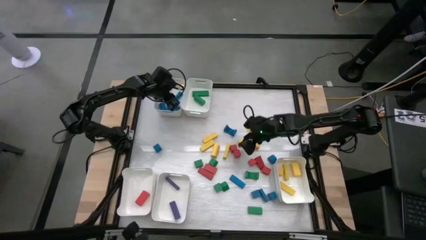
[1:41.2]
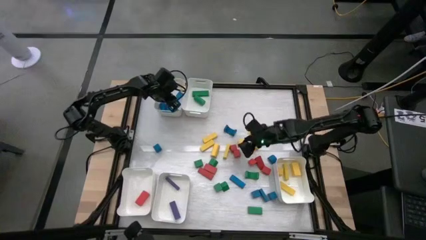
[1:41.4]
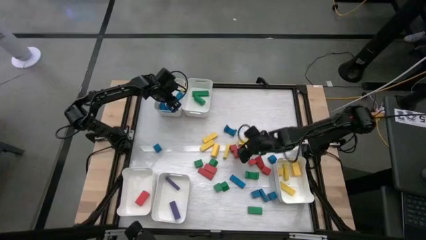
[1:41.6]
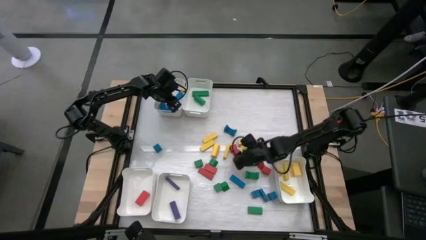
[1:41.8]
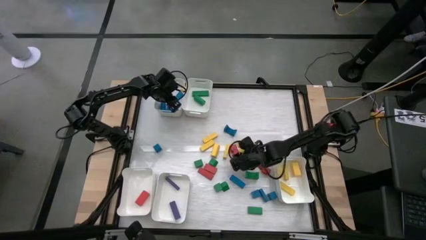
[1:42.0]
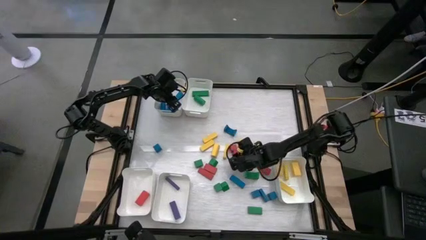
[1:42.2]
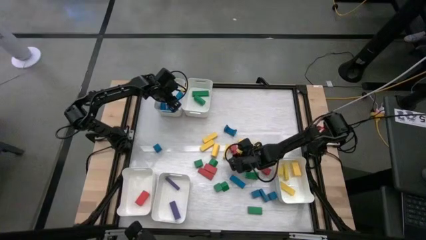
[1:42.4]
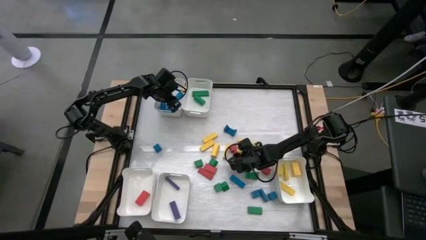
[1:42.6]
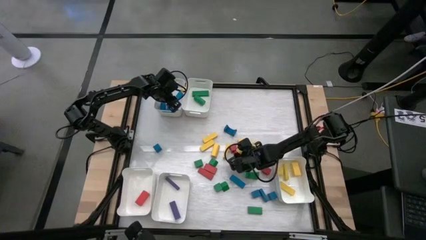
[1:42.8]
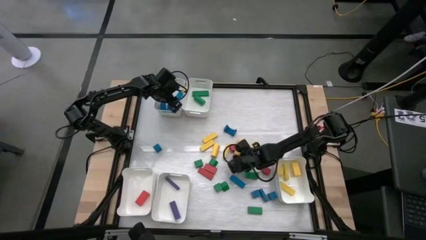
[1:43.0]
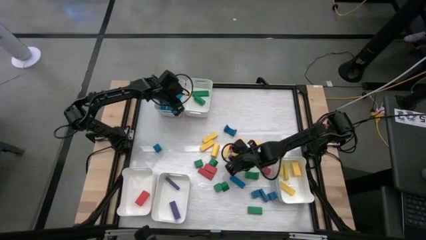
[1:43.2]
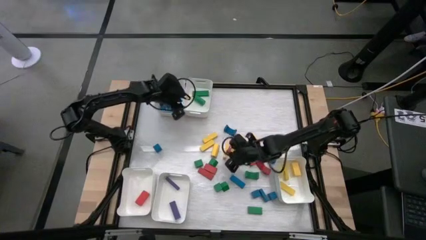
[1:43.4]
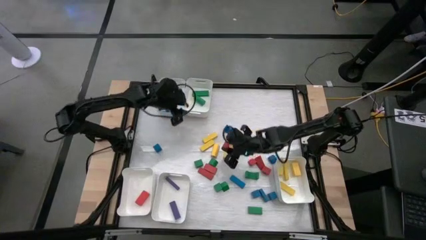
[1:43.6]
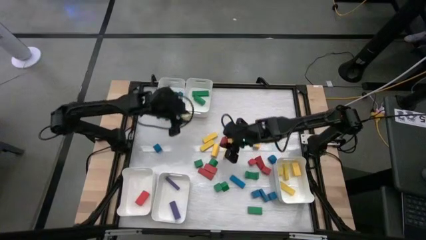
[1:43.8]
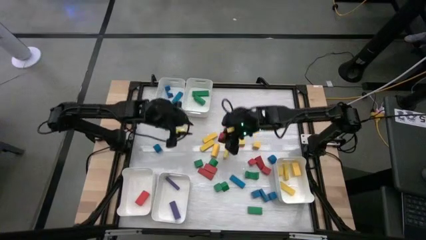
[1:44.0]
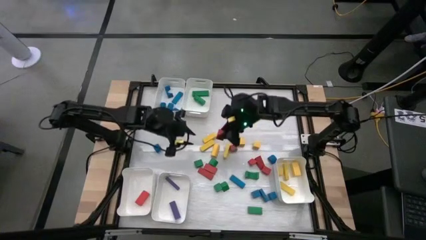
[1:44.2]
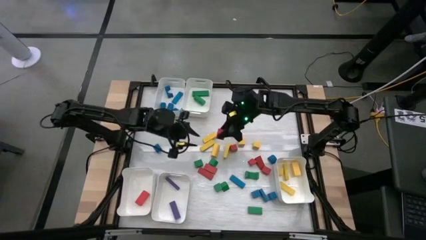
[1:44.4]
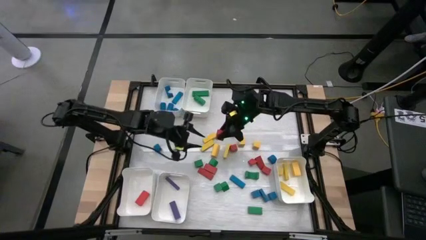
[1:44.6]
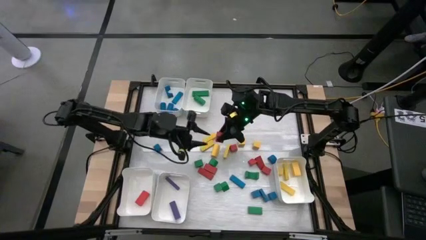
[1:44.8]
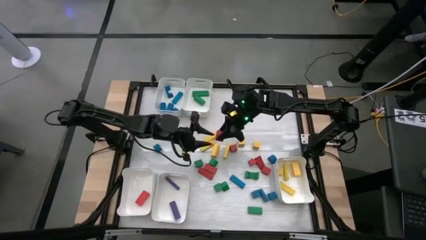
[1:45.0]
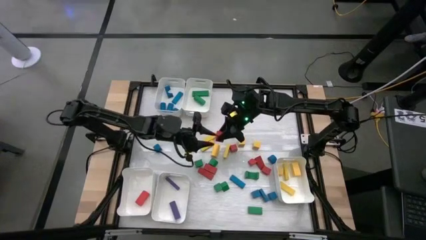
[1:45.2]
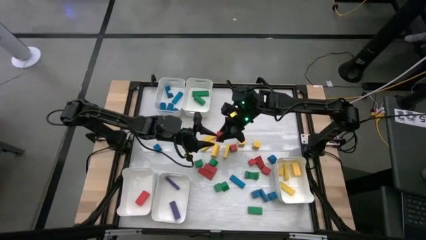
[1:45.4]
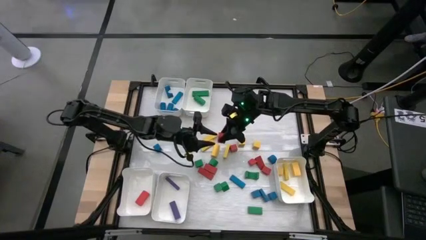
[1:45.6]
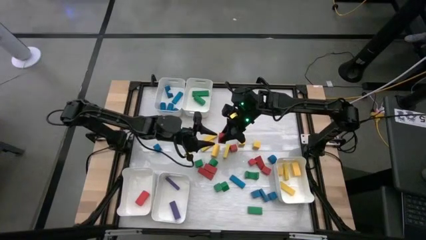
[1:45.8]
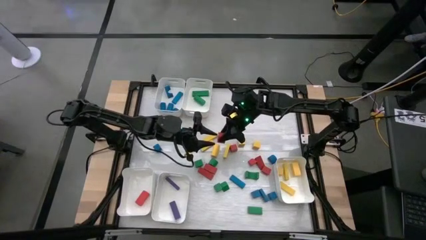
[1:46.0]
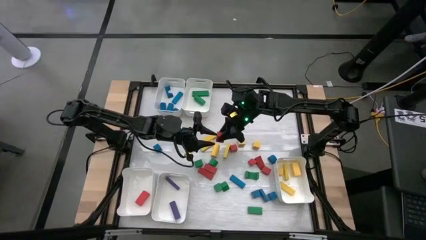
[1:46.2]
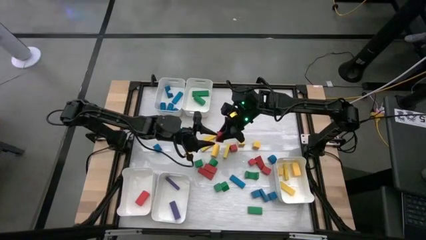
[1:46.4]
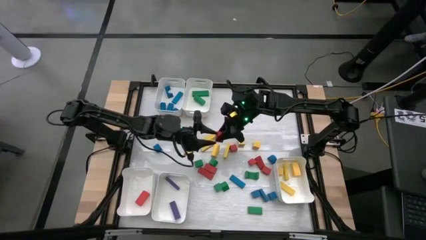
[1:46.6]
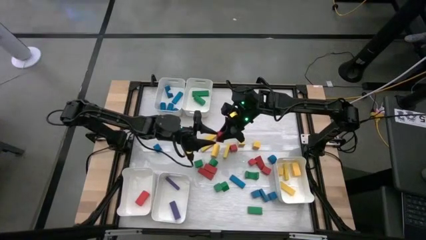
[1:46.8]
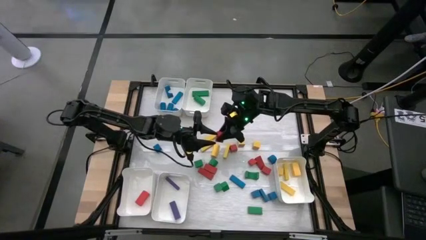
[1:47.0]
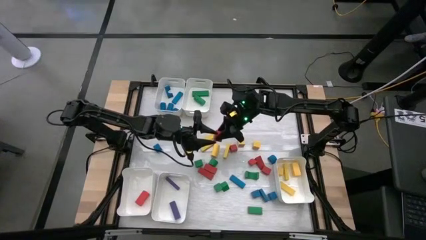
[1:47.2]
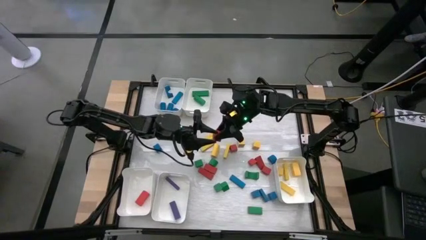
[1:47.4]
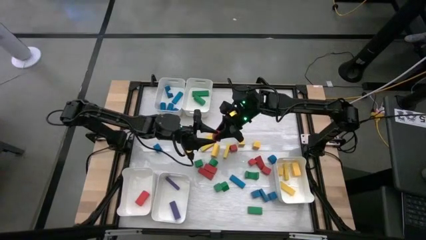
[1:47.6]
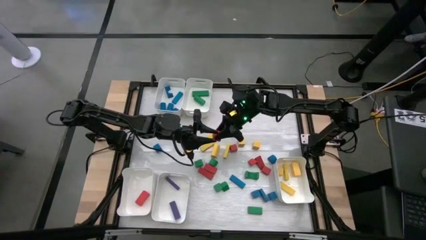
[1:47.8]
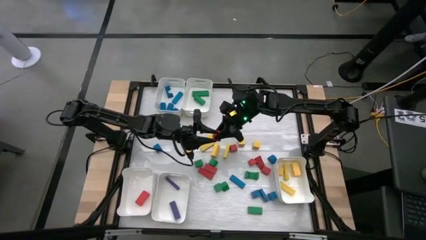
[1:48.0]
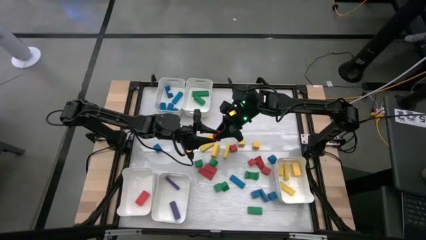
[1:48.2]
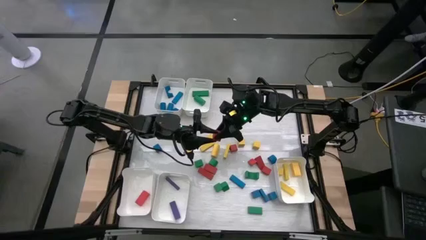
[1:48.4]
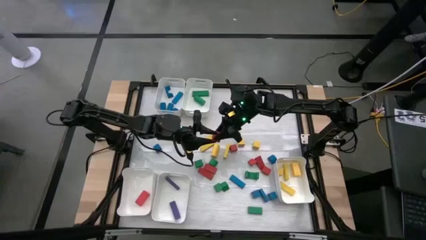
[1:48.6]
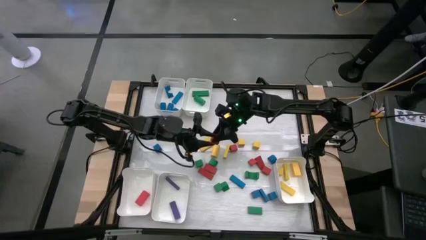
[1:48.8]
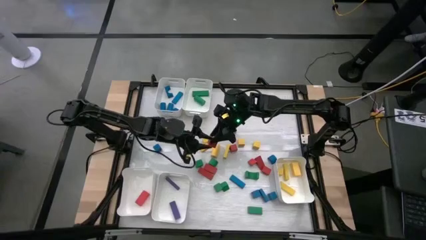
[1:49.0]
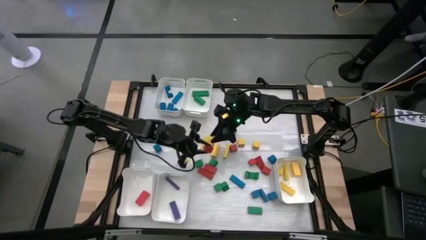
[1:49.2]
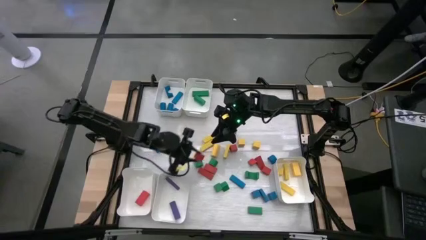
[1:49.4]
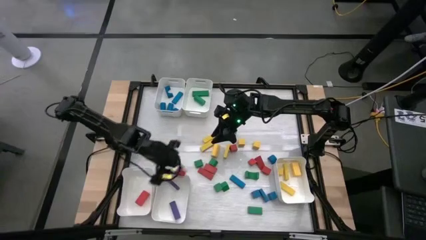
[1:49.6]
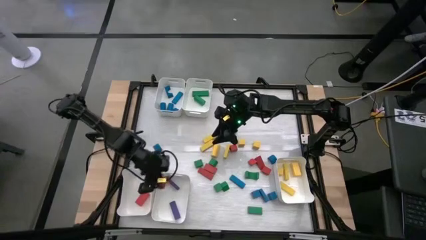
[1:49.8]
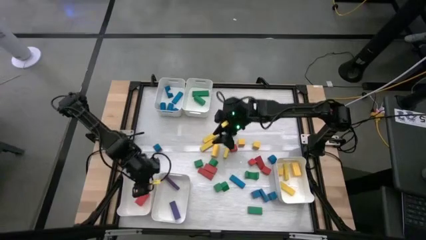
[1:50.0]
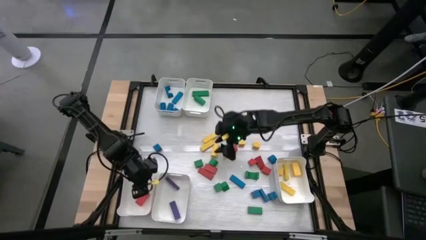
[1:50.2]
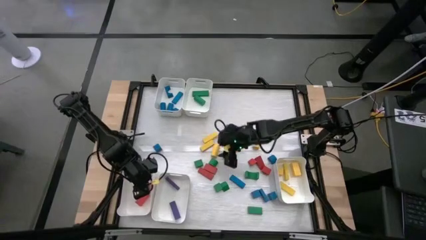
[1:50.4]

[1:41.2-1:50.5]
Task: Sort blocks
Put the red block into the bottom left white bin

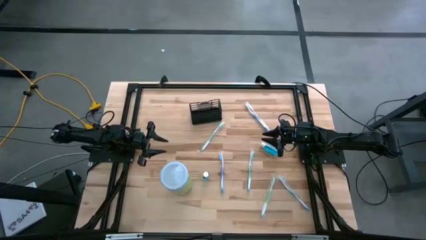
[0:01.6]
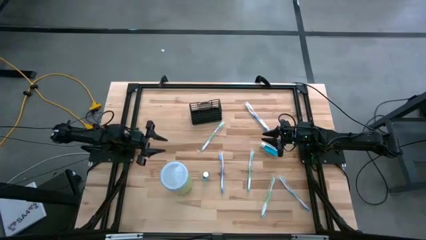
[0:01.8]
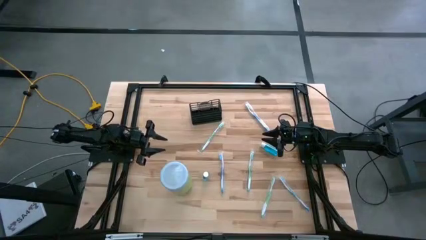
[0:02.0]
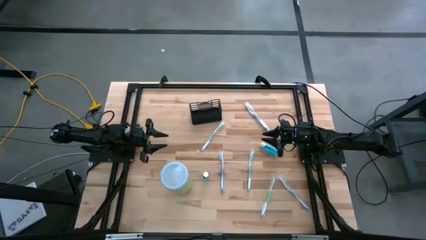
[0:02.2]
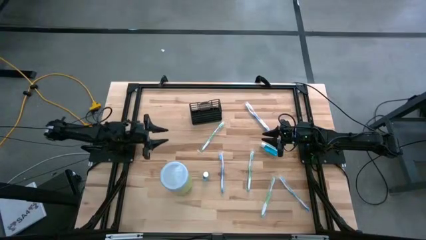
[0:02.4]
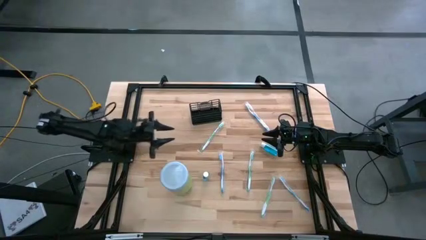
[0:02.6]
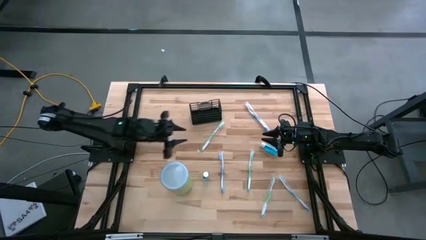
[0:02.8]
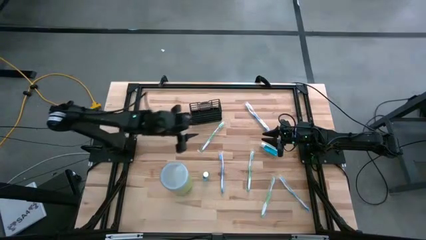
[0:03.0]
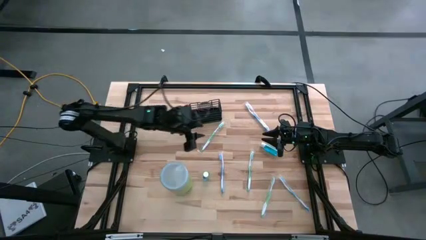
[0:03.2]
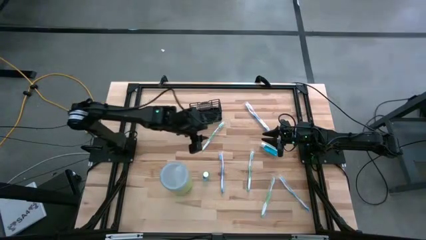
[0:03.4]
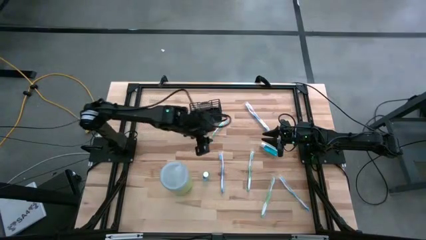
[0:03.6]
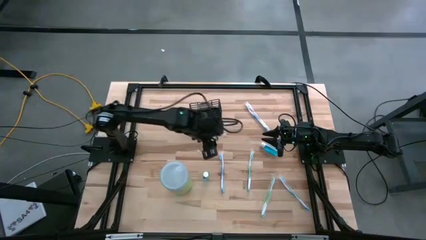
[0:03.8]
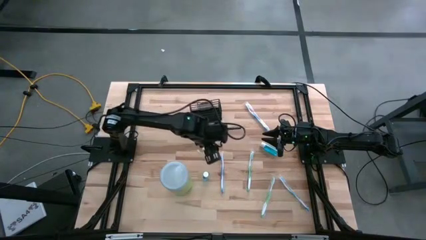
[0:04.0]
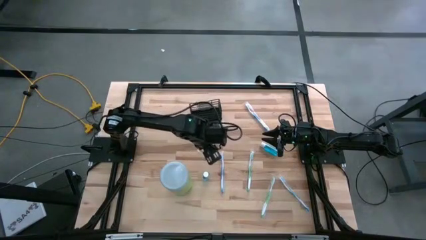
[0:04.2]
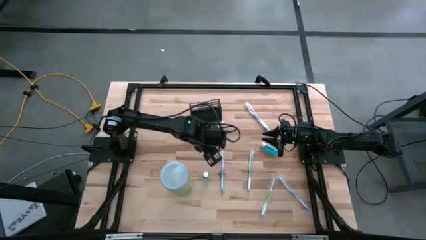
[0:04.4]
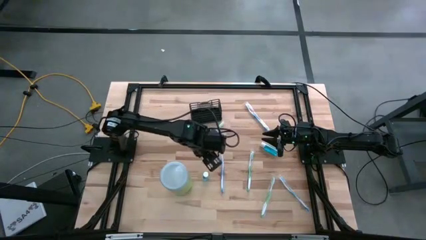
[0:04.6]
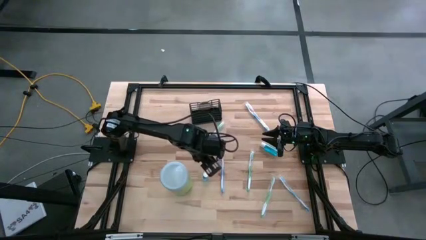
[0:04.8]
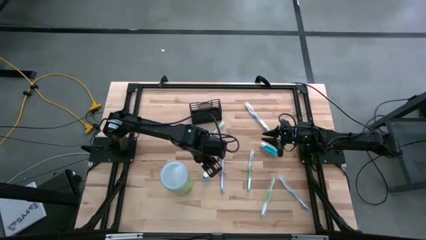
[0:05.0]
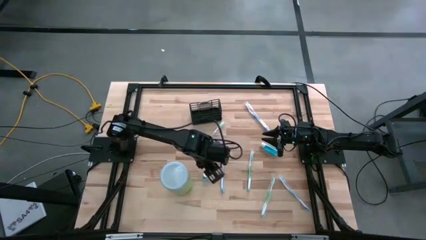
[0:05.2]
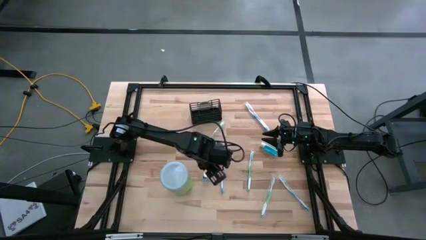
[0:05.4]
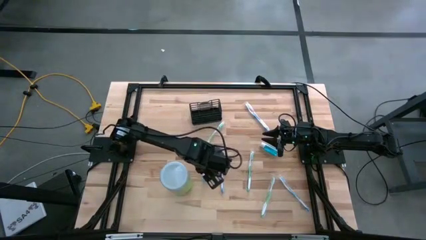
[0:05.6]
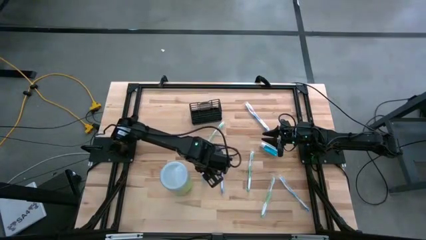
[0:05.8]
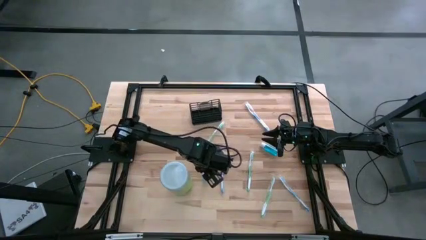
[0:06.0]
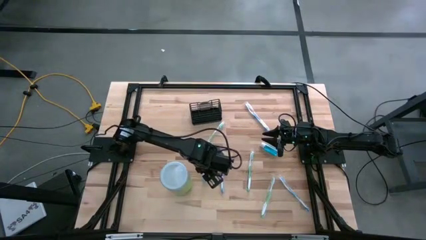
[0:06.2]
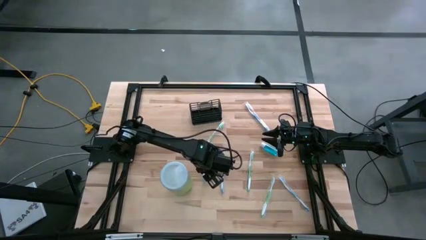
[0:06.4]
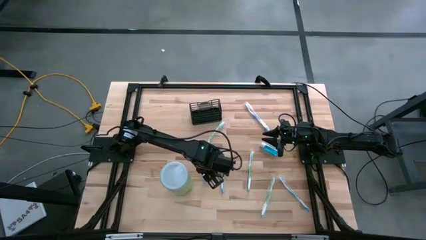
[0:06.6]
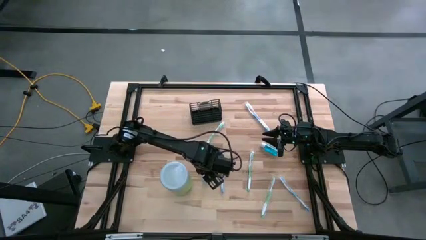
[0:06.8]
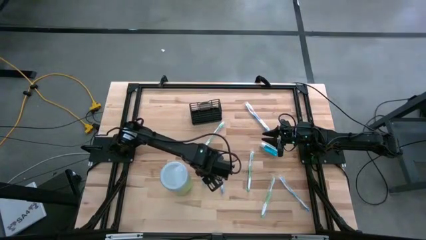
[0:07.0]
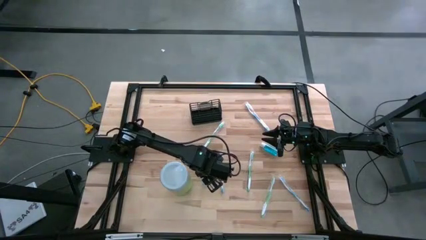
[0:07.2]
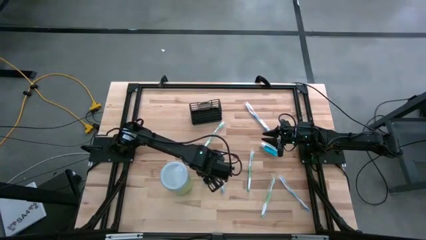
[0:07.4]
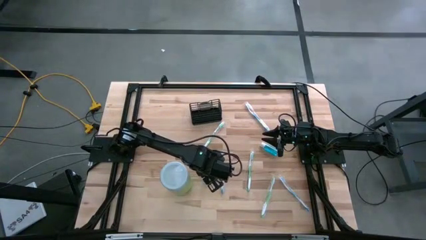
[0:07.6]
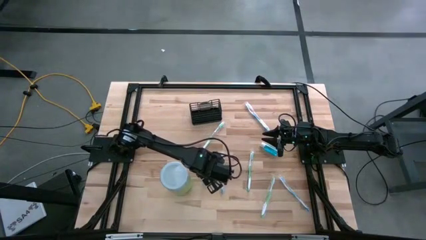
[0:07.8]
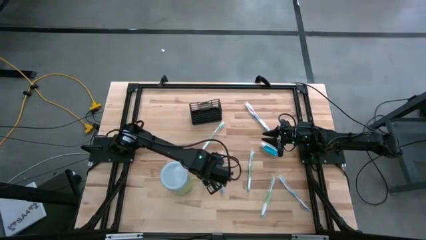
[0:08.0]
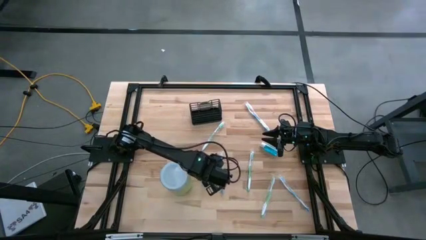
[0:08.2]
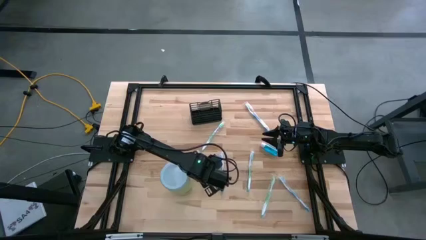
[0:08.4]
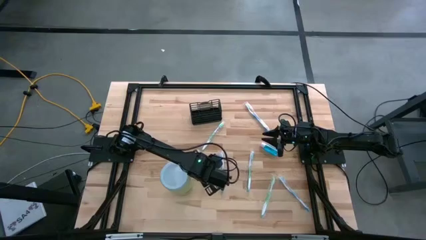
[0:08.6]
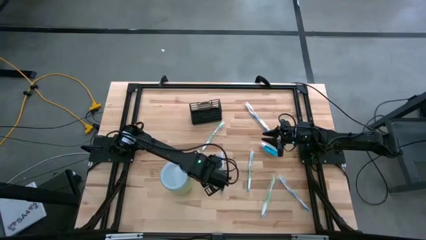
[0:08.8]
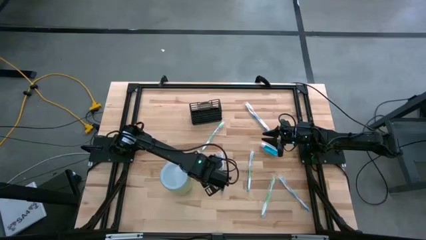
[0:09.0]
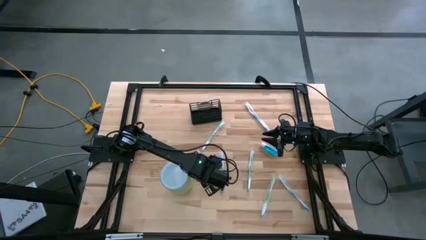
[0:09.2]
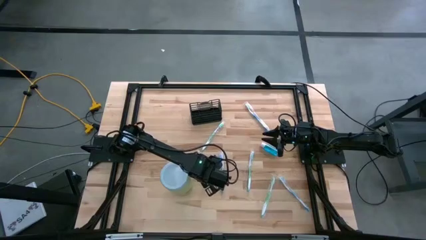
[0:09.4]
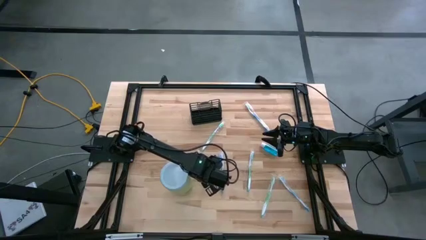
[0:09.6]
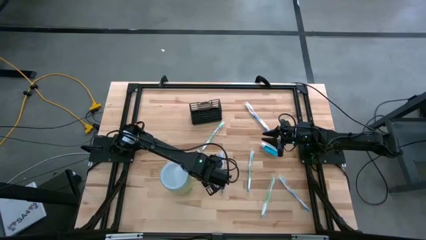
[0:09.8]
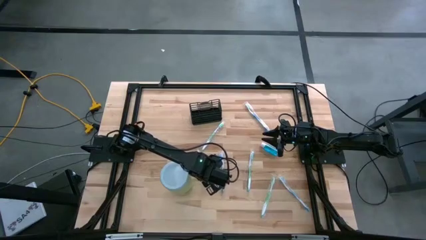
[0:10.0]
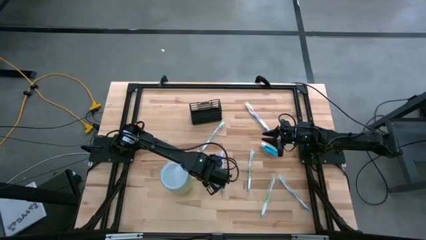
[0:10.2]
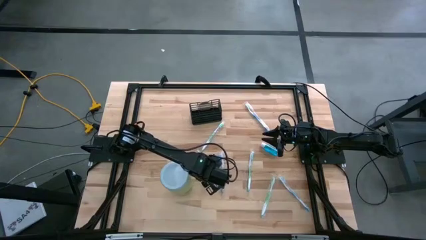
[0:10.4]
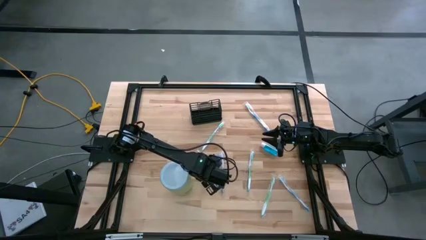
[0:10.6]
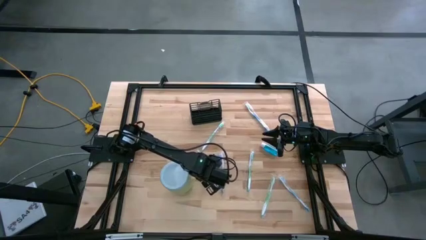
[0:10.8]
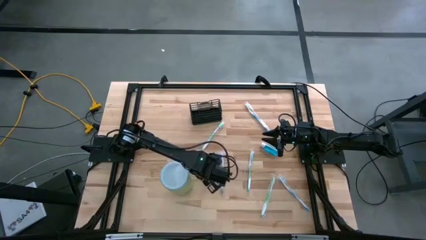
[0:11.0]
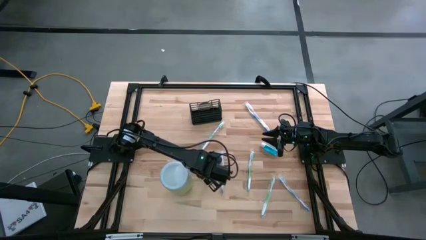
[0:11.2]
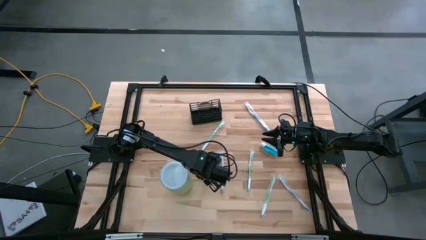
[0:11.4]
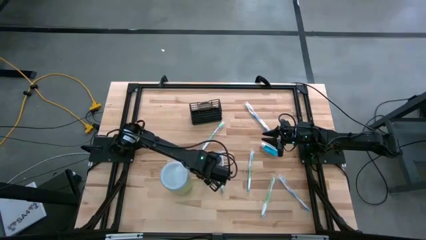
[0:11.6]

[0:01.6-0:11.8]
Task: Pick & Place toothbrushing station
Put the bottom blue mouthwash into the black mesh mesh mesh organizer
